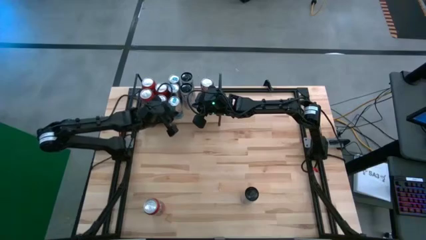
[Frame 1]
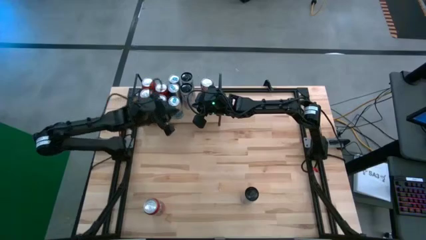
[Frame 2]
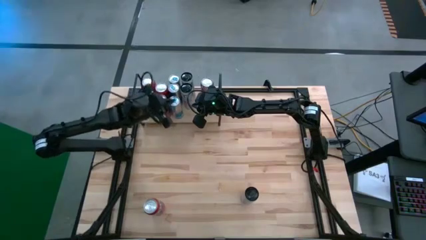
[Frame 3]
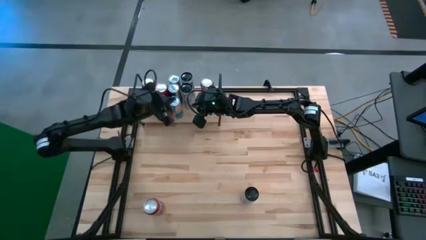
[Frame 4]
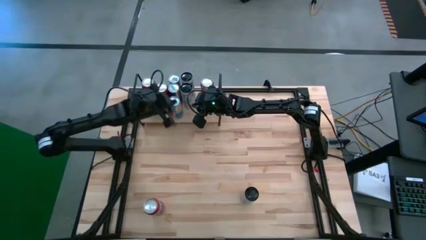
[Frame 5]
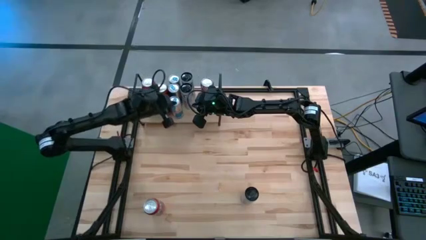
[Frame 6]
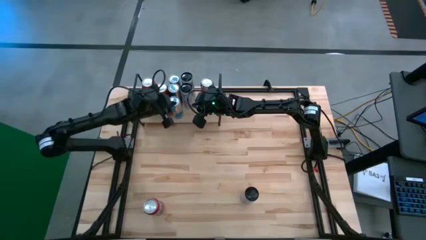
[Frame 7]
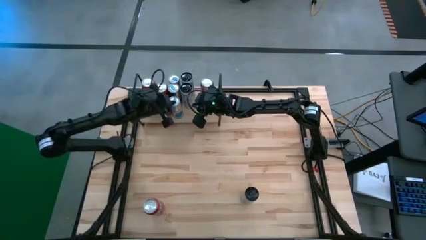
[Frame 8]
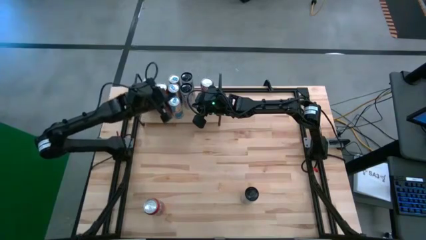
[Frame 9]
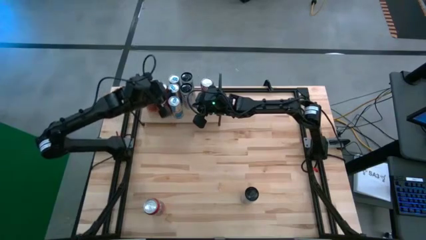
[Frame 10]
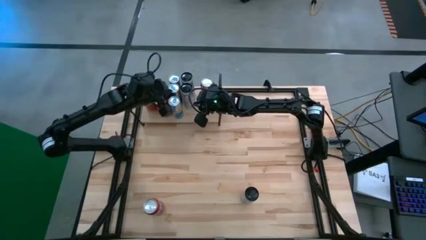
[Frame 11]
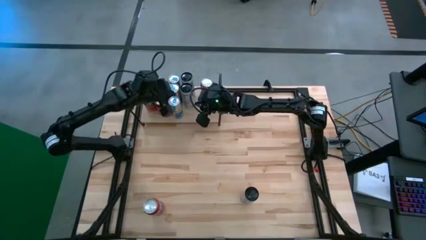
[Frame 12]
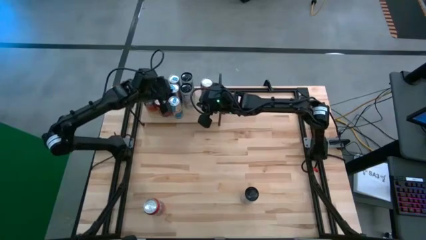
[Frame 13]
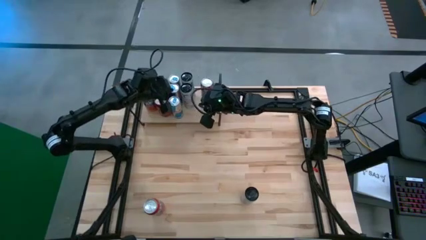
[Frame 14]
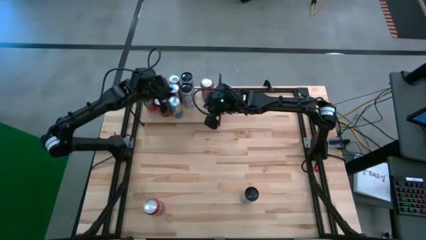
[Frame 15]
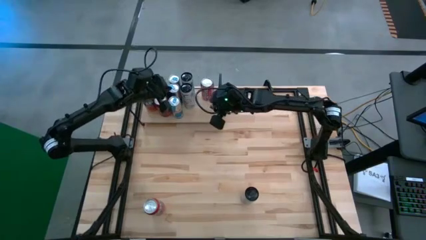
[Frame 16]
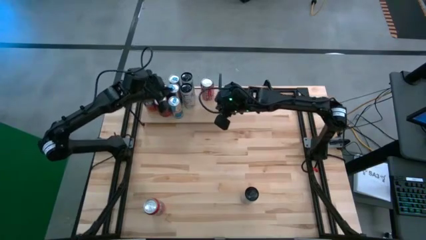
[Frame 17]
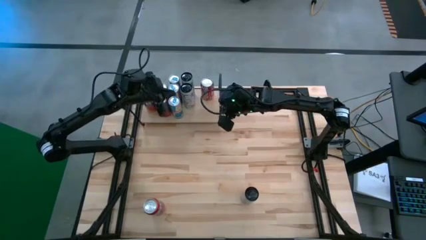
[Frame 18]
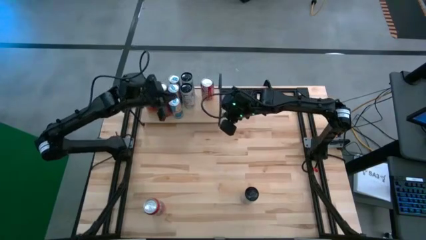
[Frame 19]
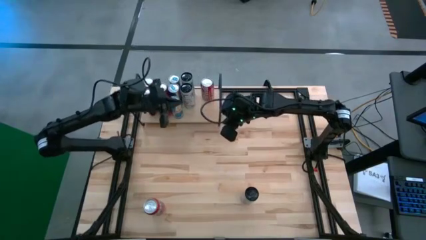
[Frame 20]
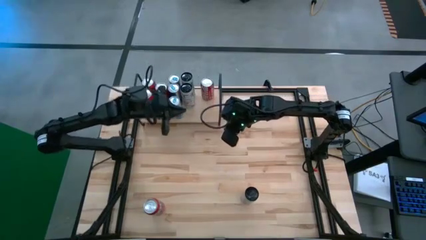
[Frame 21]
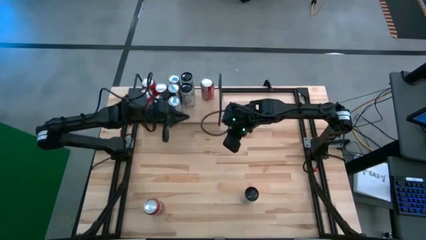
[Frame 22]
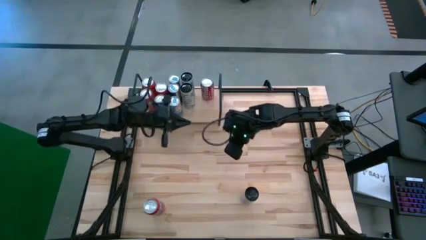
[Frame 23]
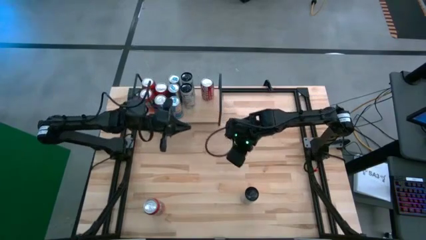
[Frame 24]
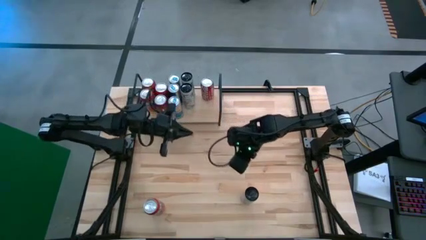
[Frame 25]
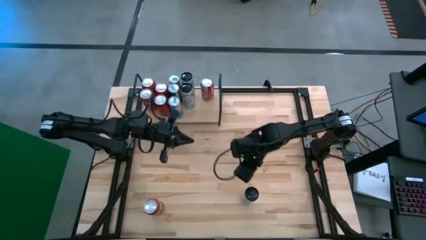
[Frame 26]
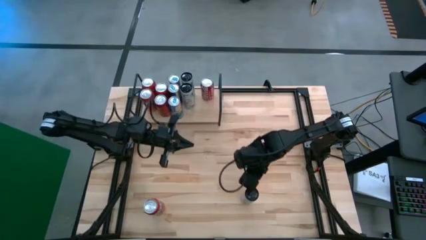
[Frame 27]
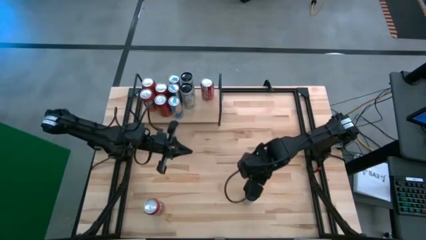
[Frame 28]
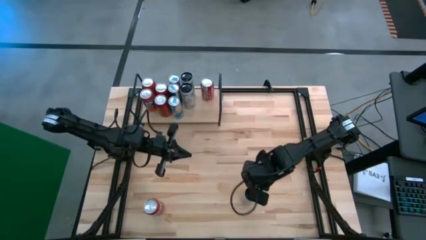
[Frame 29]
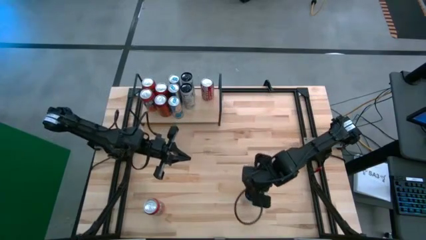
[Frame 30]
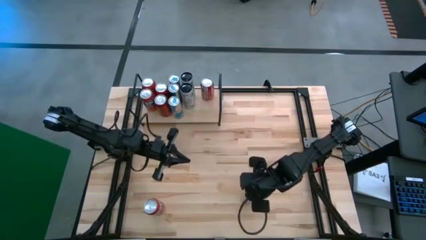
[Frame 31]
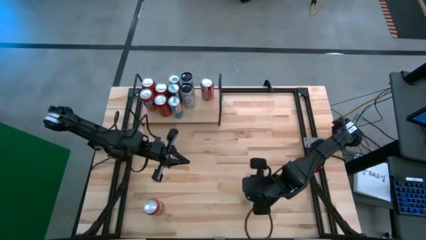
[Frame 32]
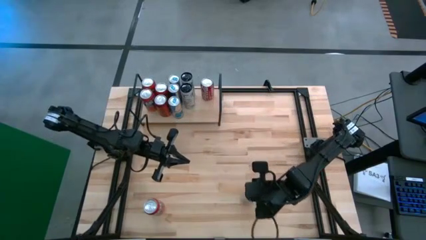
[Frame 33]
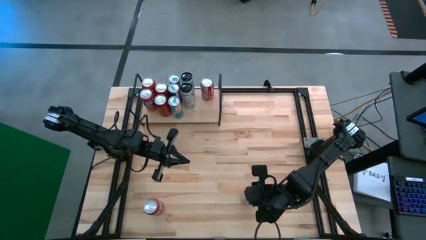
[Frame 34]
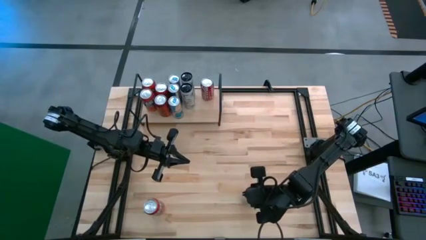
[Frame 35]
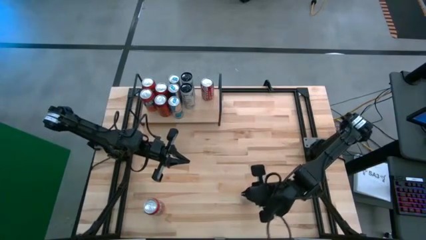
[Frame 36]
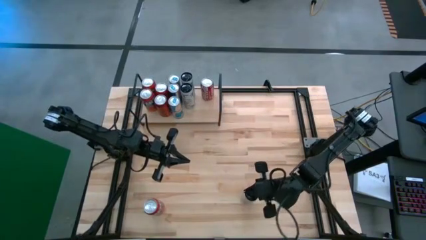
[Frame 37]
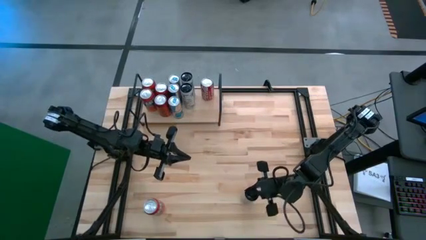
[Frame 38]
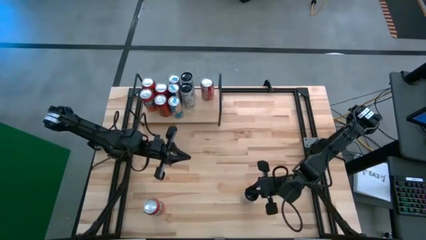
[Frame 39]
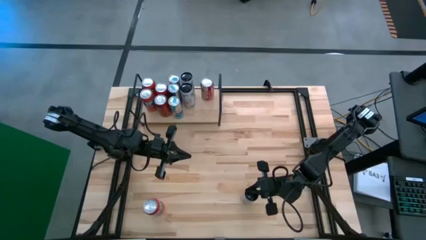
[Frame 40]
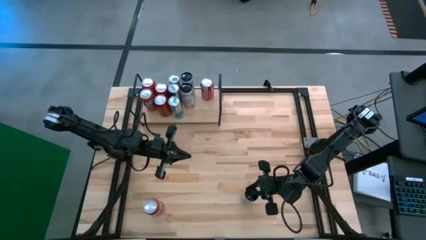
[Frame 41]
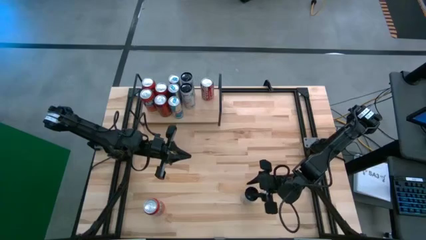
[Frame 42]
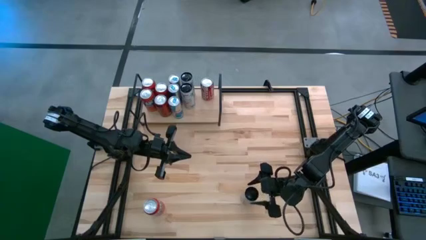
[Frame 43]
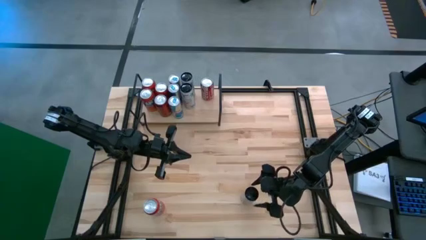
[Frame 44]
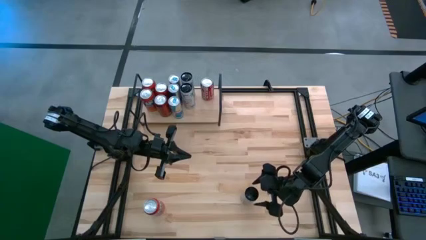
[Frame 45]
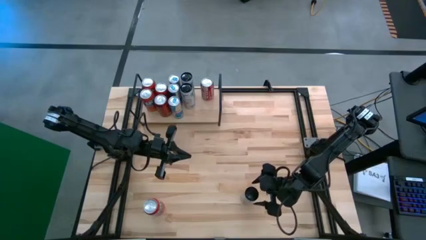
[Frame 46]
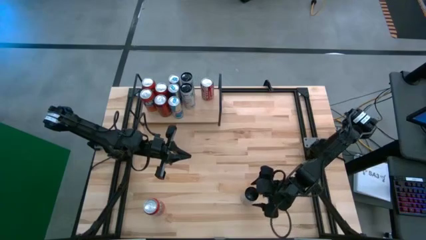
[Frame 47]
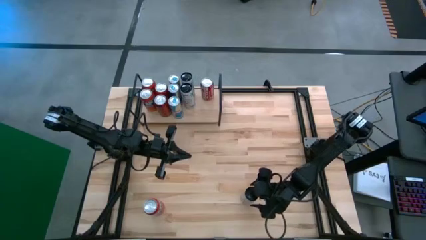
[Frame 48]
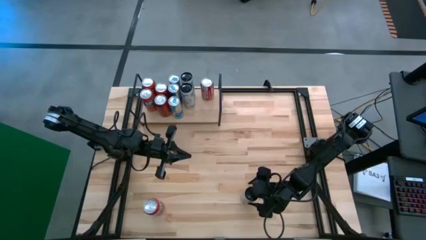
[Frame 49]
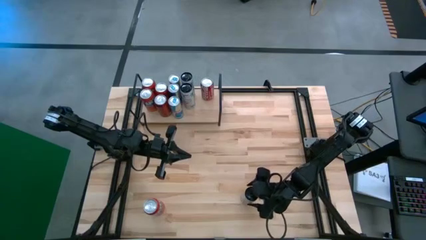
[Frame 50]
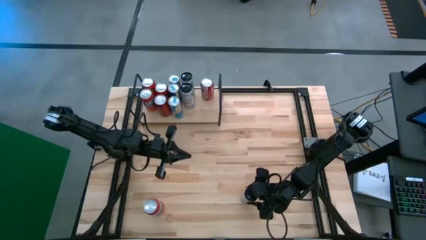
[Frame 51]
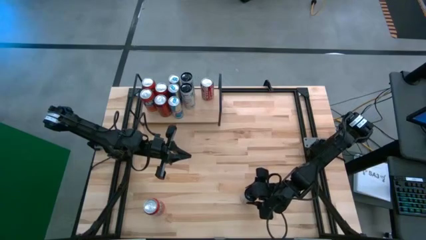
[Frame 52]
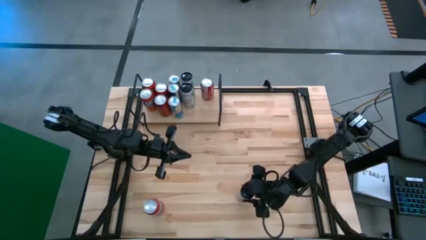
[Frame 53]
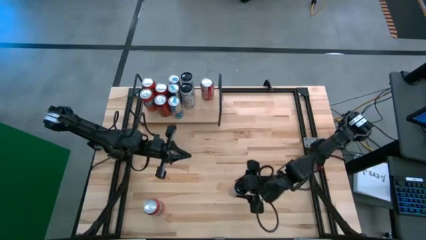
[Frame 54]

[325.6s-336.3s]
Task: Place canned beverage on shelf
Put the white pink soda can on the shelf aligned with the other white pink soda cans

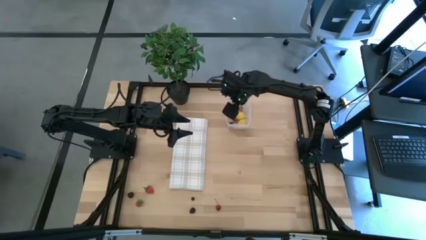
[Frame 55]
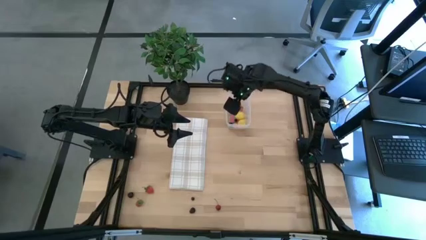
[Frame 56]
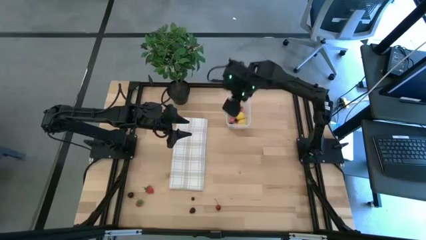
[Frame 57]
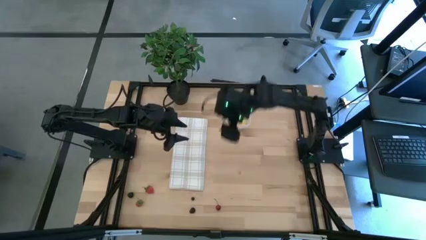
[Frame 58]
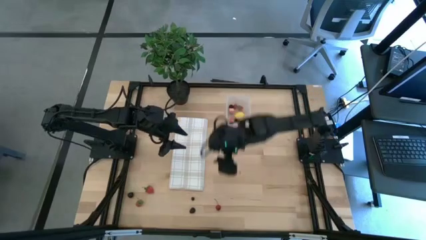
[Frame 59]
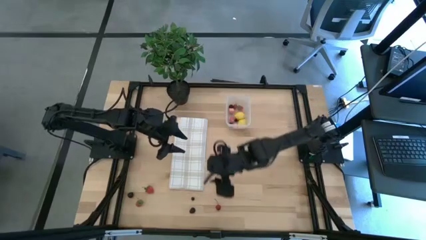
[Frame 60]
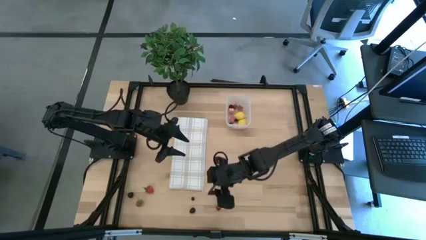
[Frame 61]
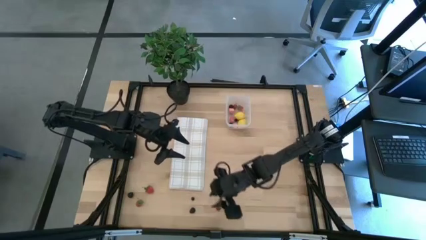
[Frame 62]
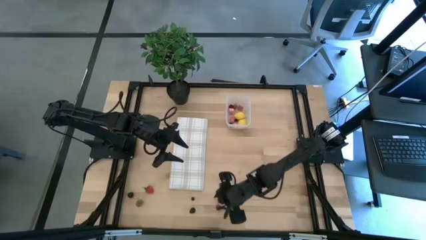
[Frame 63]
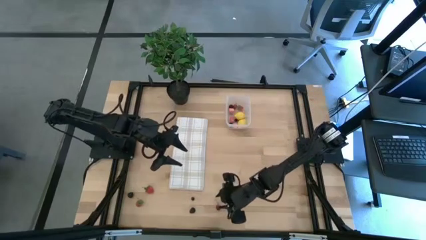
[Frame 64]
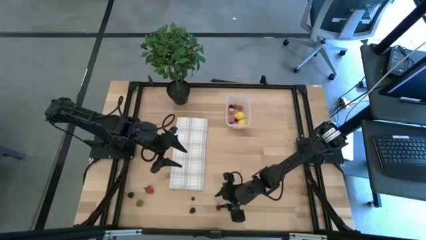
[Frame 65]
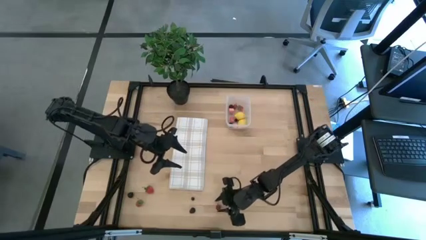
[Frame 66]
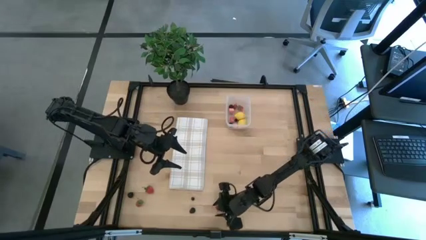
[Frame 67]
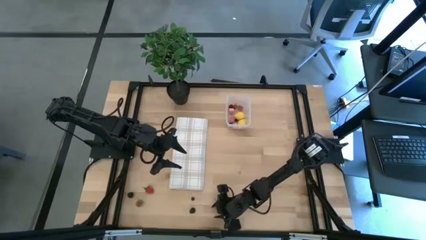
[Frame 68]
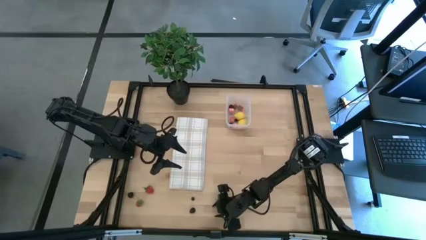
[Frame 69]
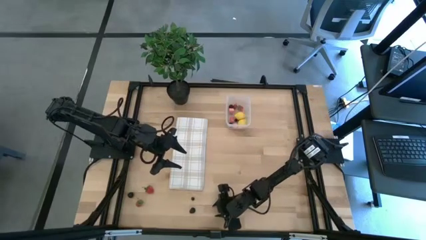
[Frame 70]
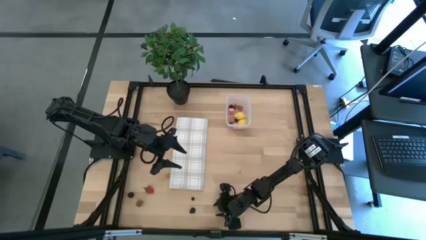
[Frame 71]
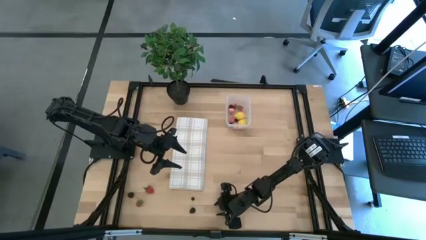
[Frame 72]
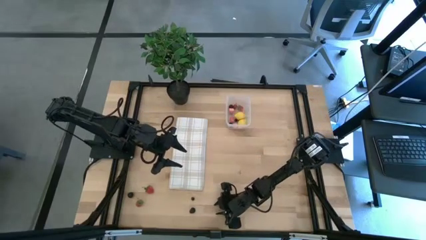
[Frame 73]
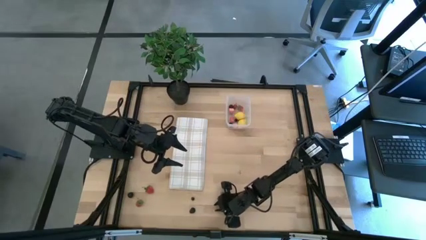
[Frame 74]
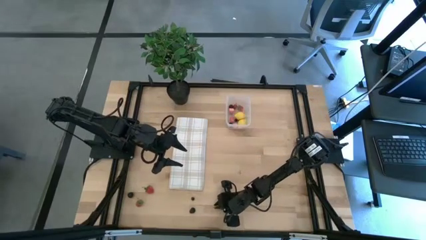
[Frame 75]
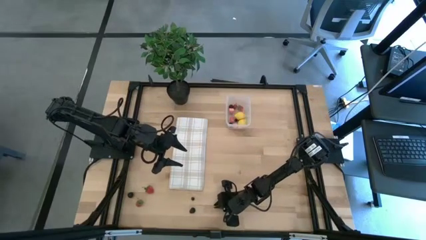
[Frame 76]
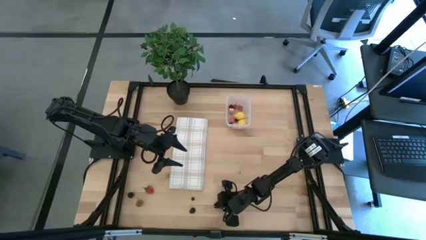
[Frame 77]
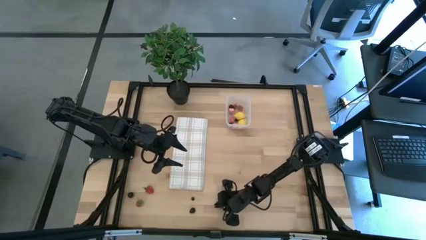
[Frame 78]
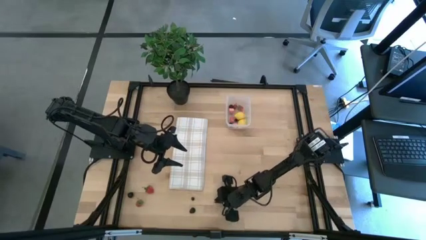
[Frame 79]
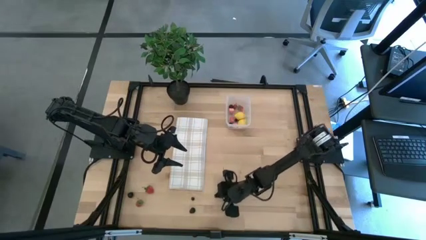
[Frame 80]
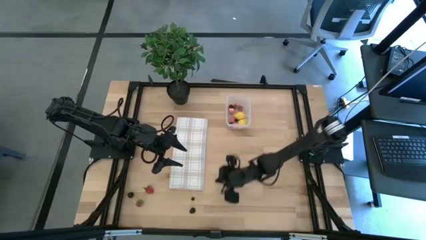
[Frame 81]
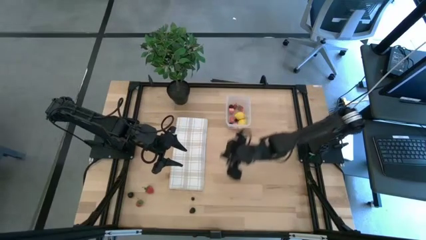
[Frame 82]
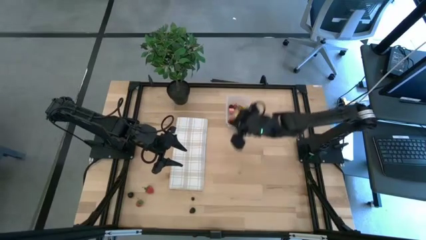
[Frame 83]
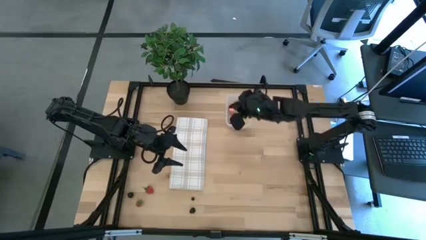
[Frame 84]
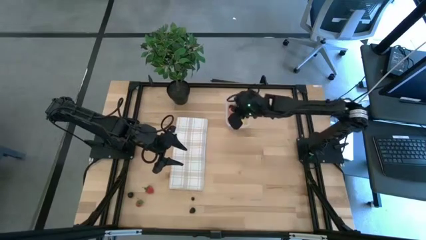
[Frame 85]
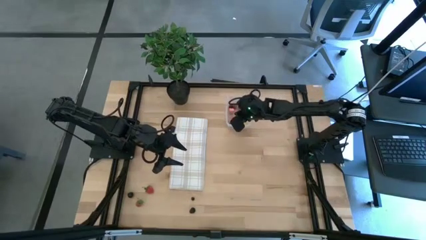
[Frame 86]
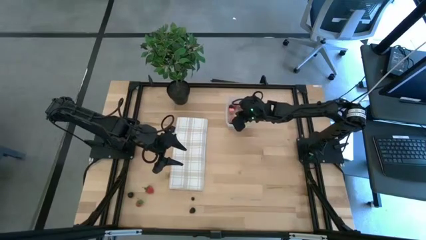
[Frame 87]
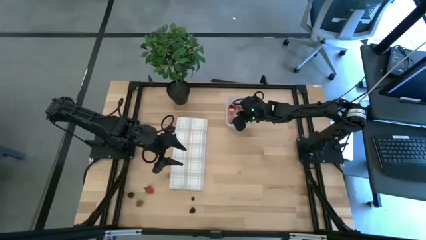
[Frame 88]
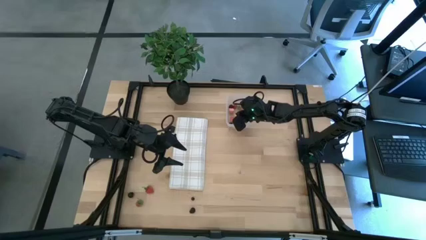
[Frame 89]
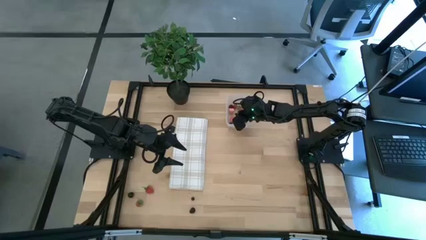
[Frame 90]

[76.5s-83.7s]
Task: Pick and placing Produce into tupperware
Put the red cherry into the transparent bin
